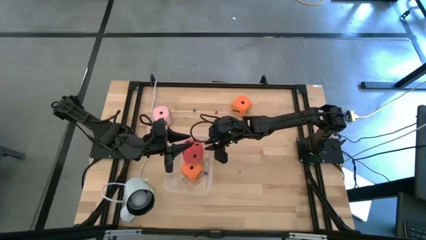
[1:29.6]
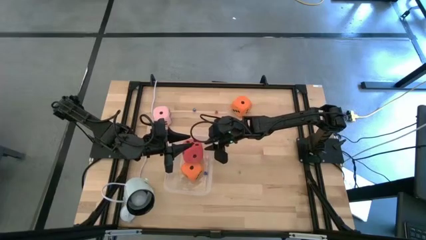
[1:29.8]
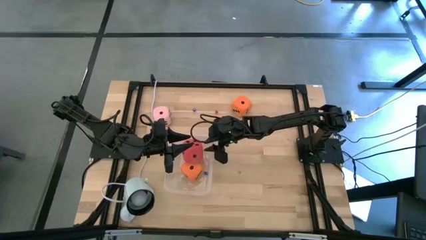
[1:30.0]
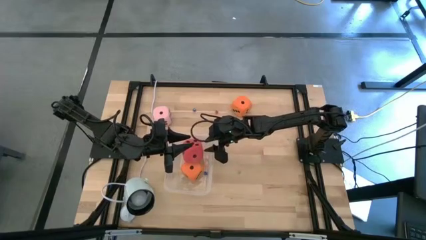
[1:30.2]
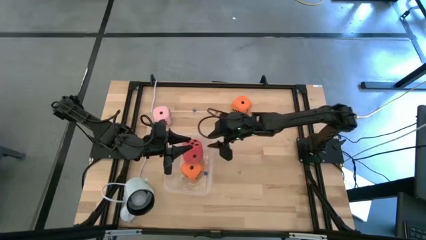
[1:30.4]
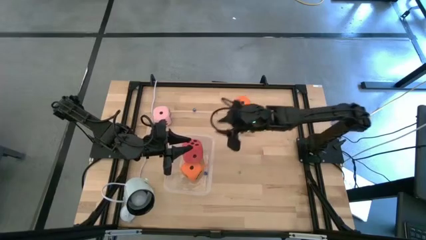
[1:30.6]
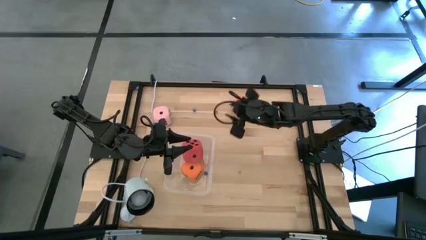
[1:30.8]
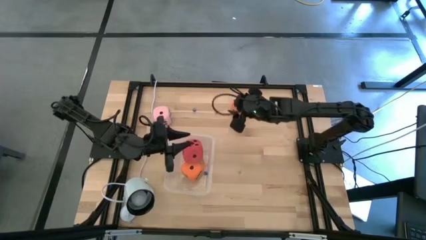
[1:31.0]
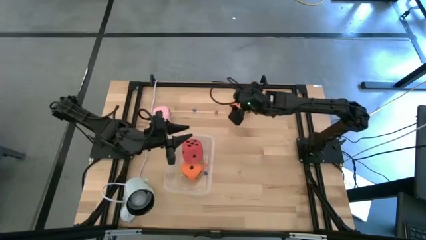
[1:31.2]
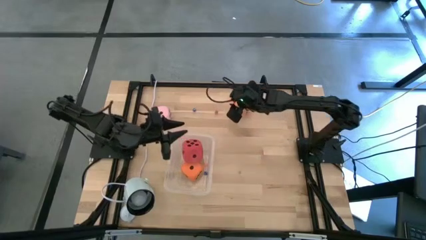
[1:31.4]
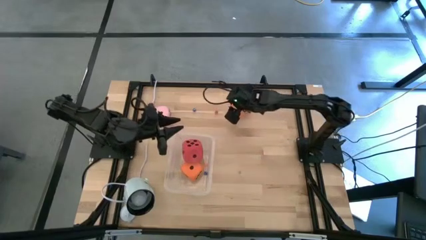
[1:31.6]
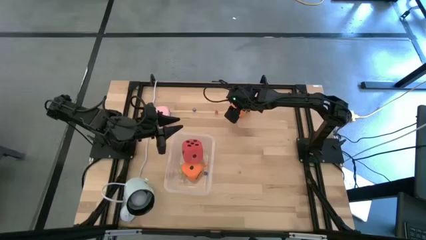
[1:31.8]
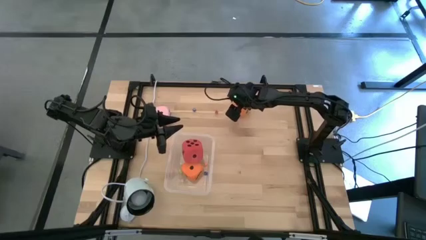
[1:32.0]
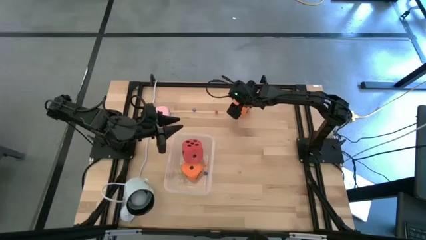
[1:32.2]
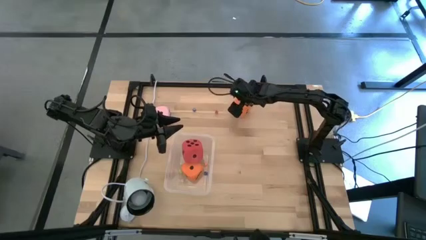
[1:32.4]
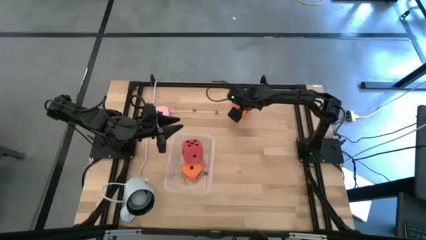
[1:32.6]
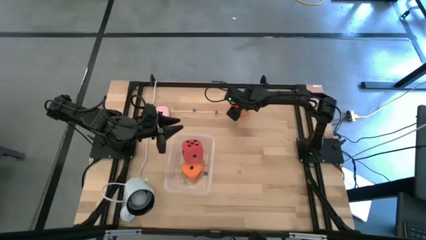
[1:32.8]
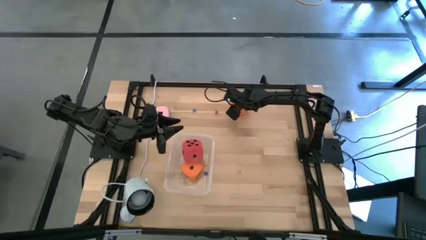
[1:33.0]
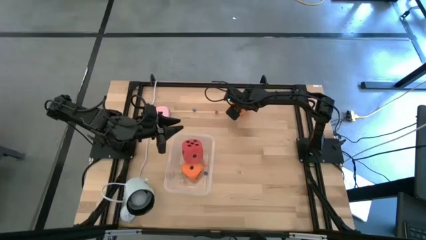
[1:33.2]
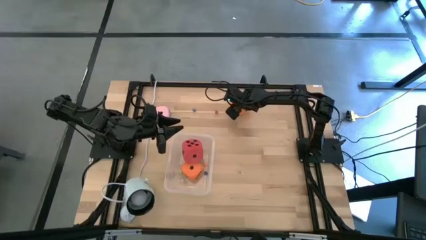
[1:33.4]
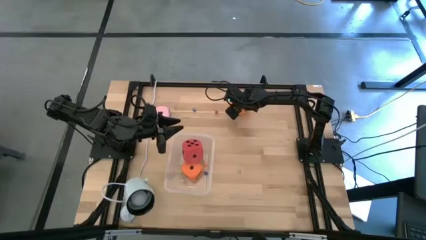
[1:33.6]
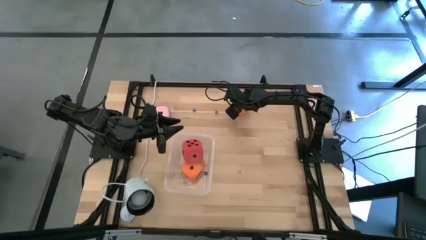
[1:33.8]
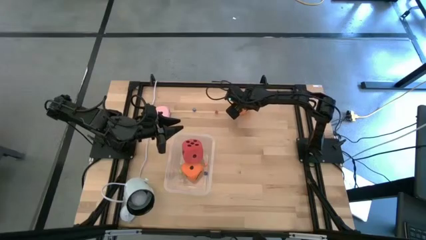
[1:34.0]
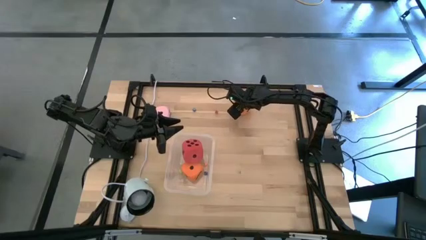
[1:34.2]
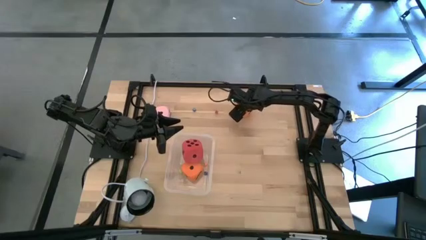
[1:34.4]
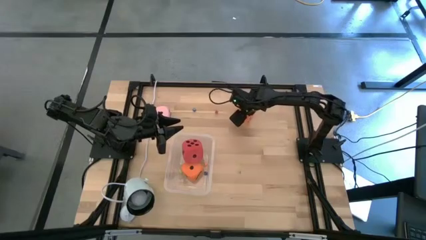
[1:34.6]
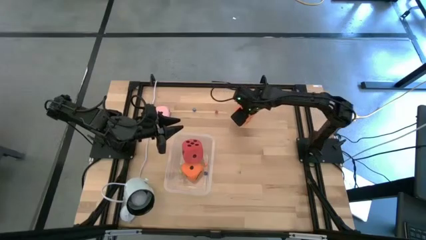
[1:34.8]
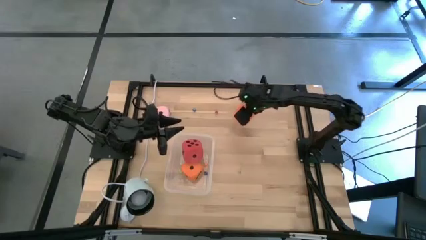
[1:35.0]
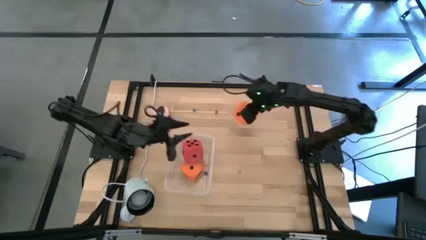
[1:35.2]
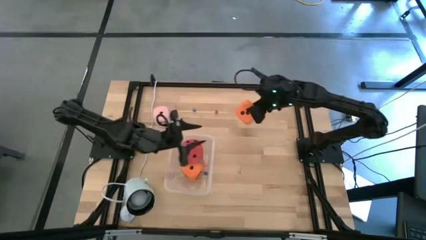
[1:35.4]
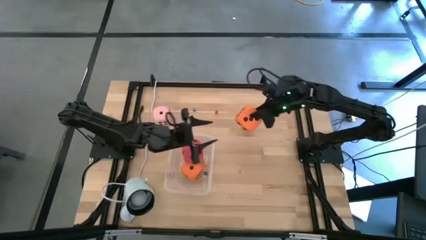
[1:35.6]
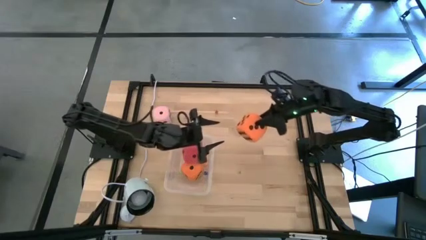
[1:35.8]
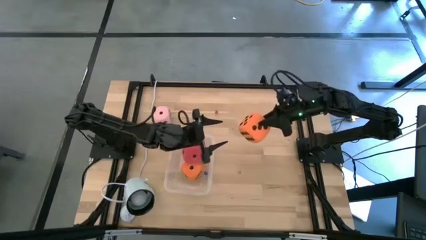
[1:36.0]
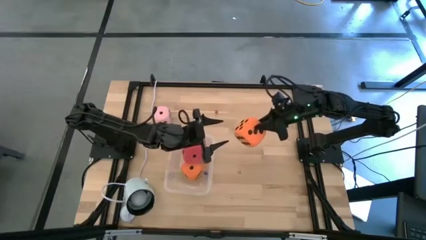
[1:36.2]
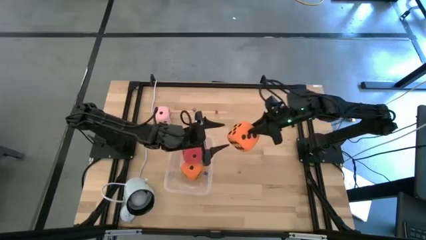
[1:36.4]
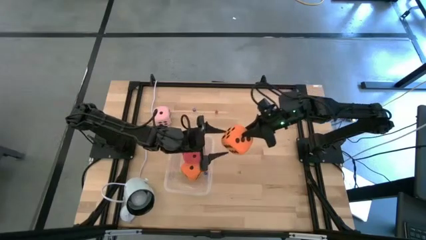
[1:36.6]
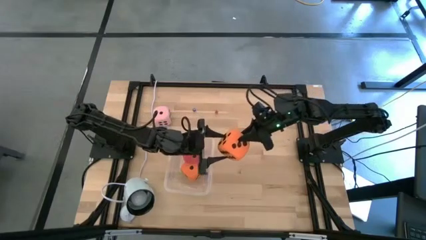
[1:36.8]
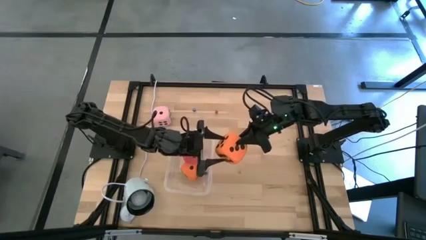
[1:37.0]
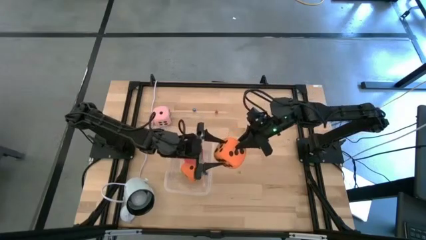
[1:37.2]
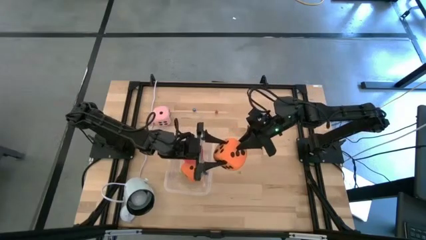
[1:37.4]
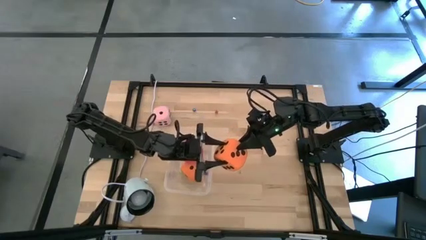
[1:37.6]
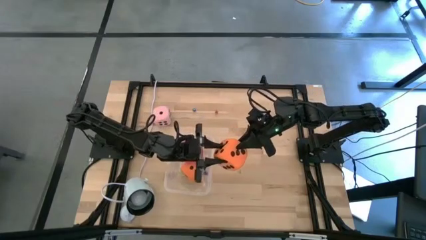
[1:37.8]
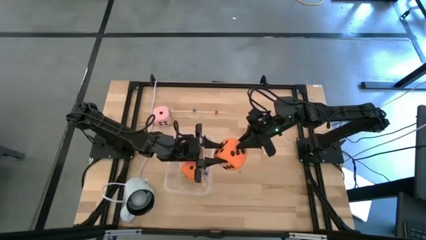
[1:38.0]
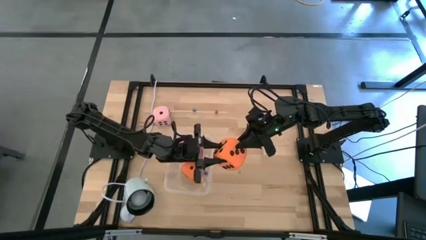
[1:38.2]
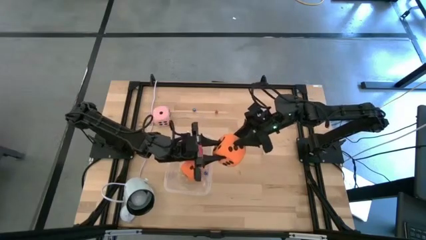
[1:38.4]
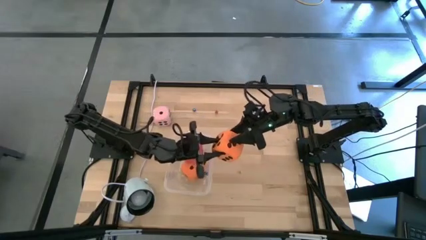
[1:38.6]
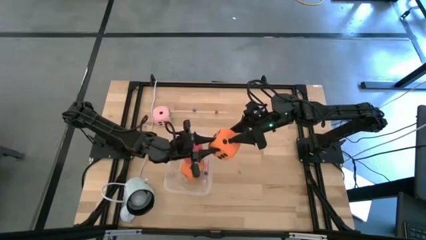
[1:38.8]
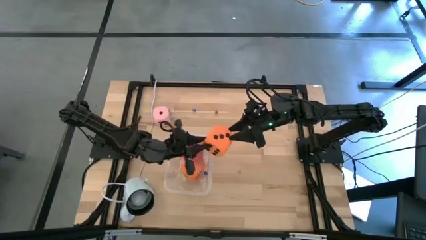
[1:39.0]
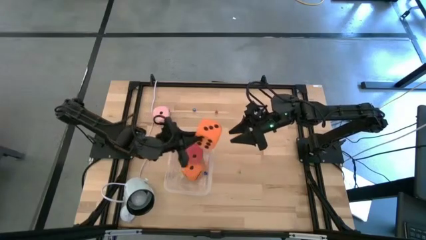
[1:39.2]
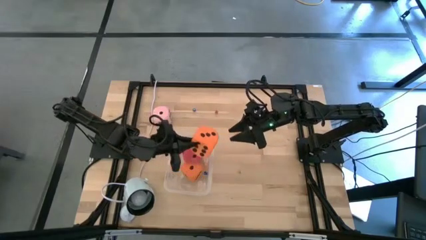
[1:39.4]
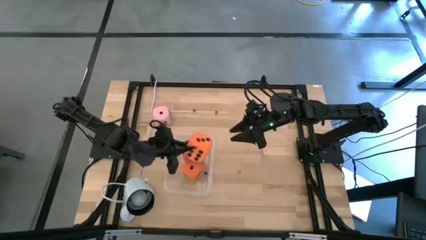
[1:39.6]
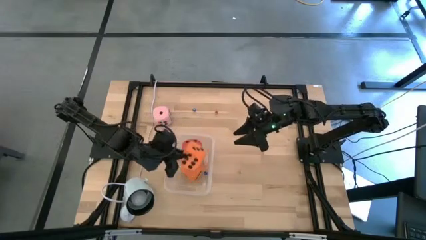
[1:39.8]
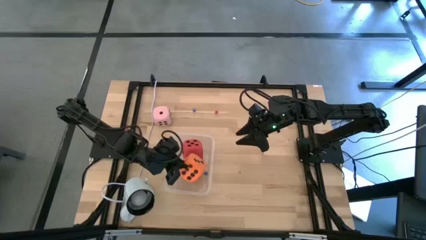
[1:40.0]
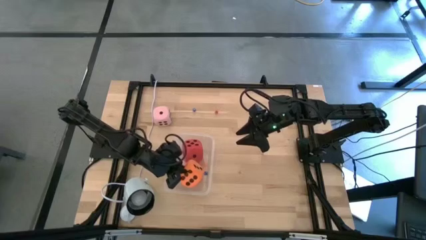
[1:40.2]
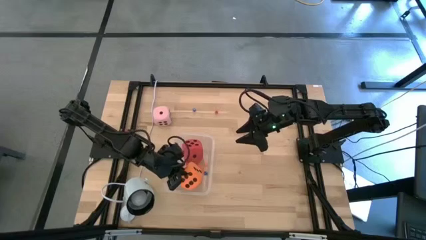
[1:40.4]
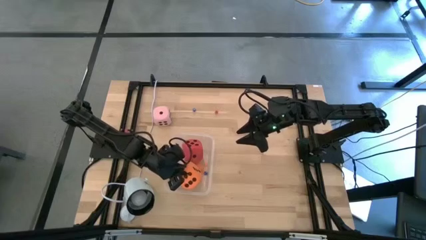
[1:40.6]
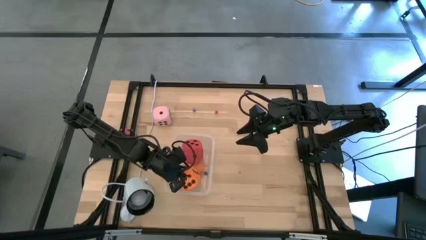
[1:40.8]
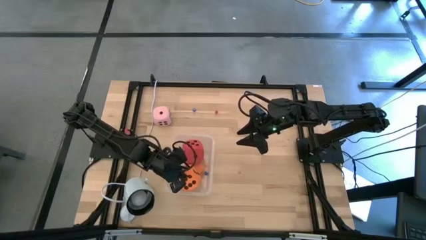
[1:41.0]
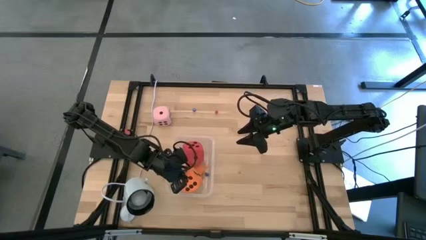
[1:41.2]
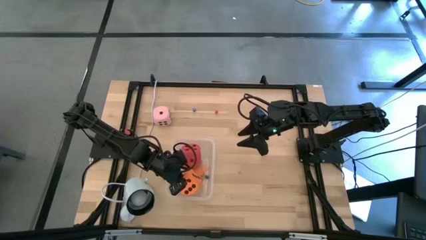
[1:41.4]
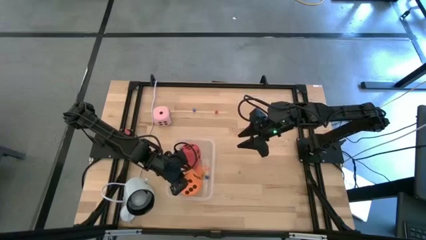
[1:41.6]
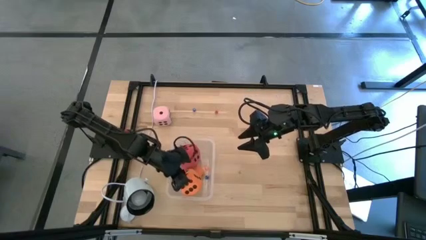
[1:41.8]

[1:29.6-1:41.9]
Task: Pick & Place Dice
Put the large orange die in the bin

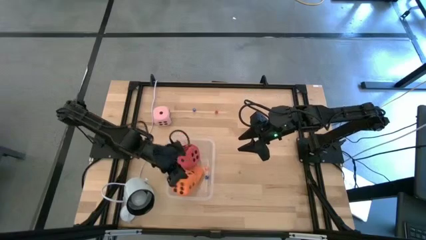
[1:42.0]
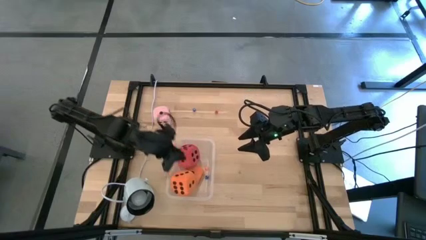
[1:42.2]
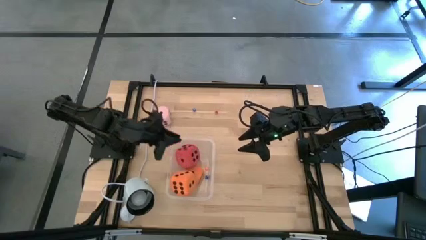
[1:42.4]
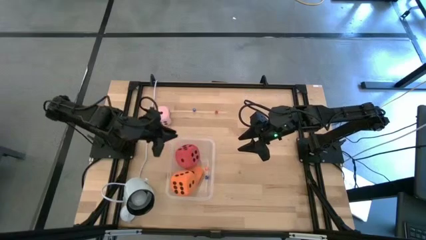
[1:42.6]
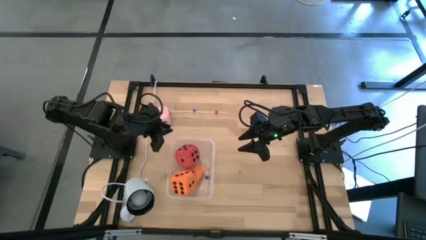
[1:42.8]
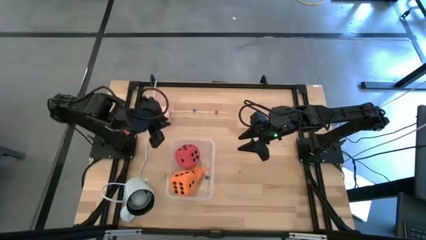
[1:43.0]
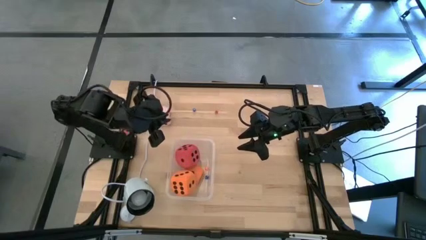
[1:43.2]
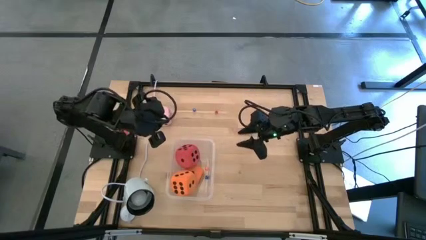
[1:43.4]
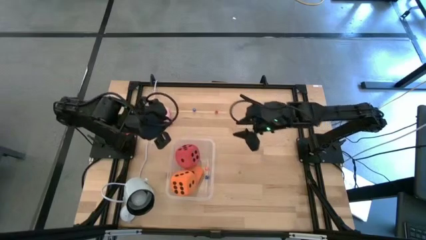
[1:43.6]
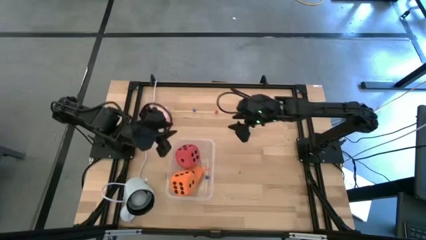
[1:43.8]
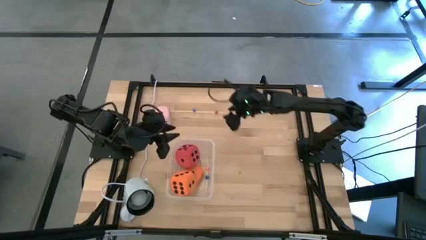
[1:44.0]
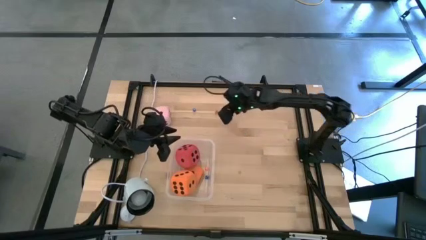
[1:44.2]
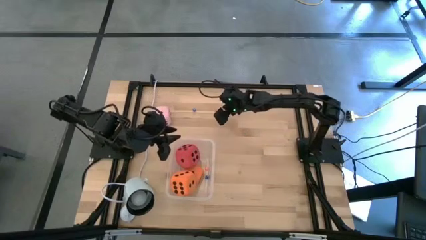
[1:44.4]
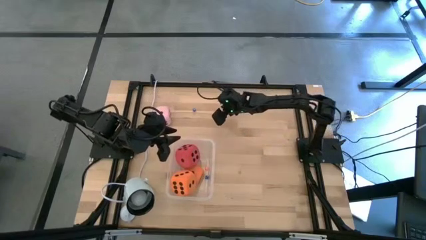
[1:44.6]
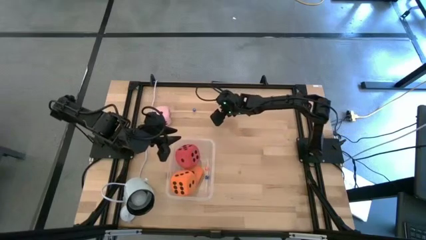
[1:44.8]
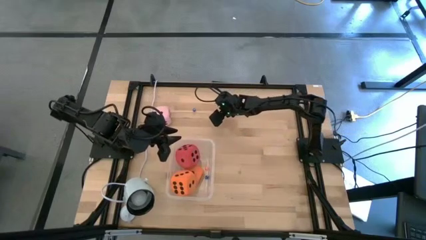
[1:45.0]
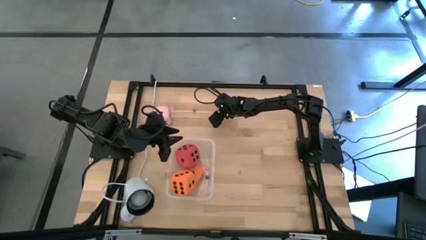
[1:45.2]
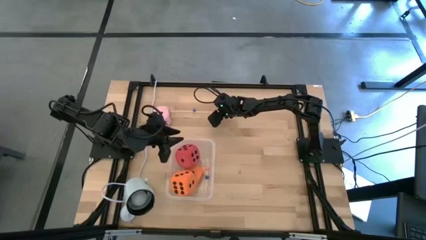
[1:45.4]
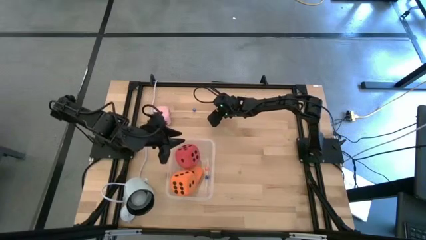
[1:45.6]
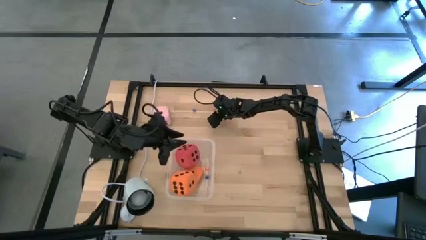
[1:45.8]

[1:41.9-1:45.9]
Put the small red die on the bin
